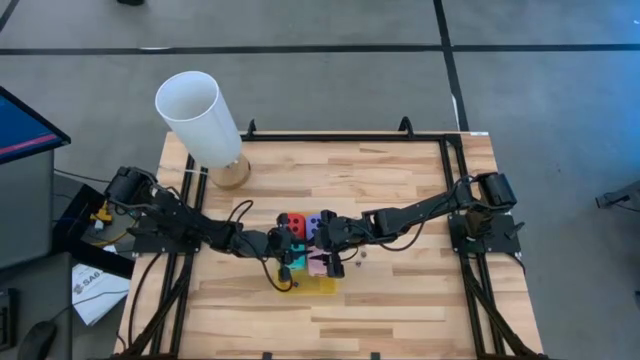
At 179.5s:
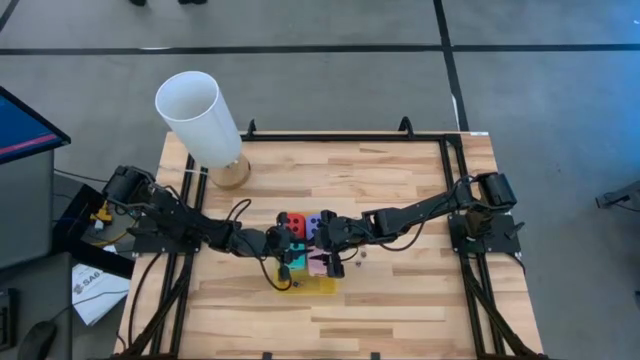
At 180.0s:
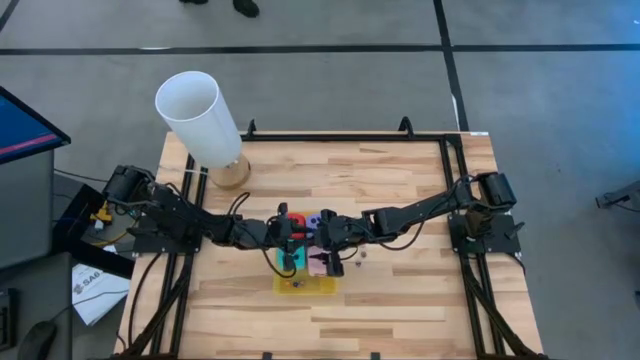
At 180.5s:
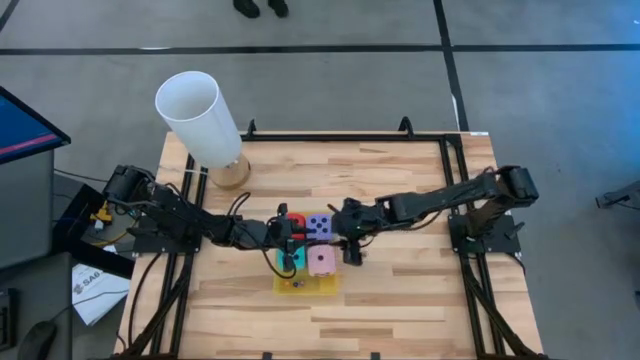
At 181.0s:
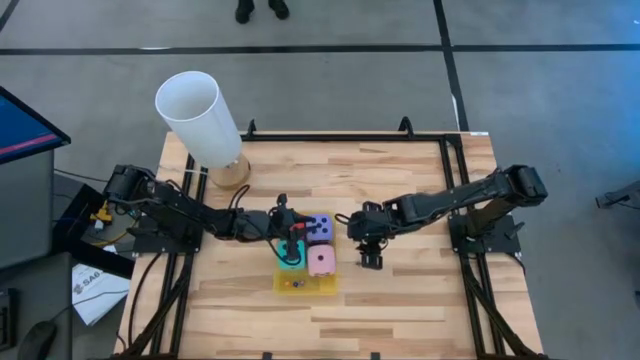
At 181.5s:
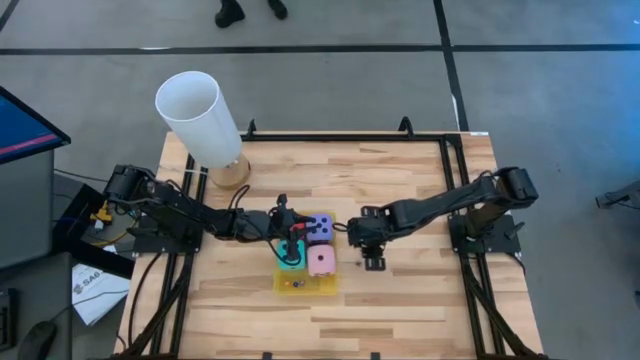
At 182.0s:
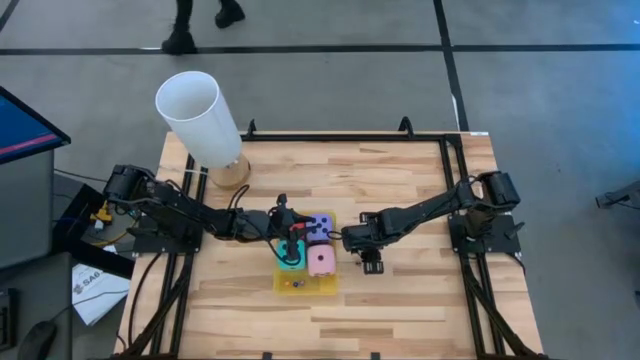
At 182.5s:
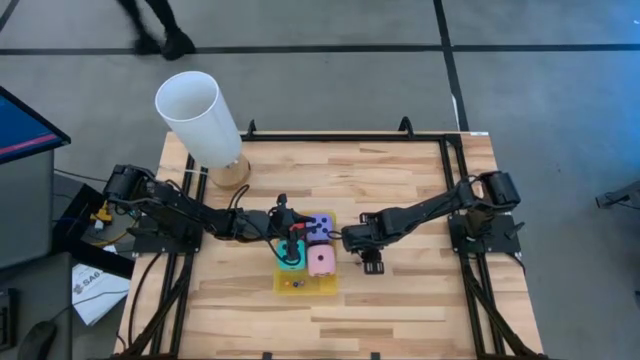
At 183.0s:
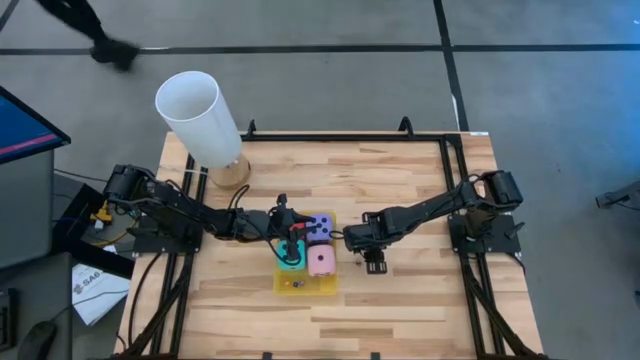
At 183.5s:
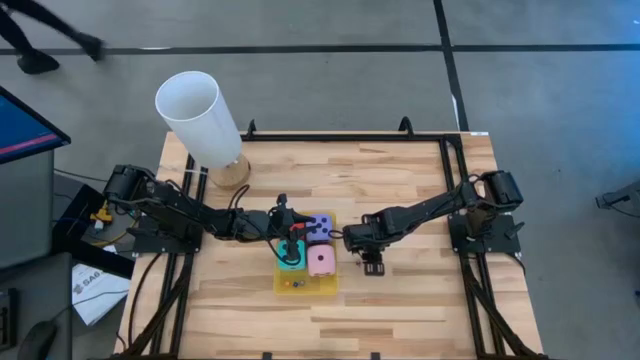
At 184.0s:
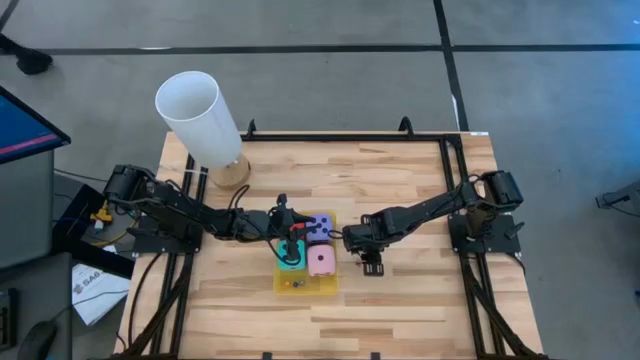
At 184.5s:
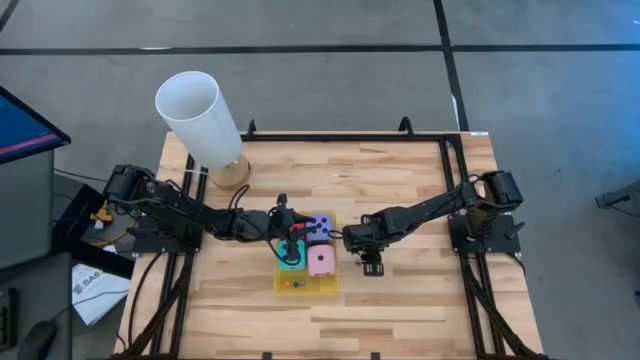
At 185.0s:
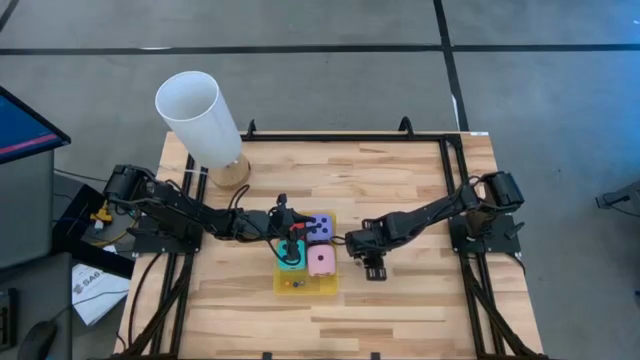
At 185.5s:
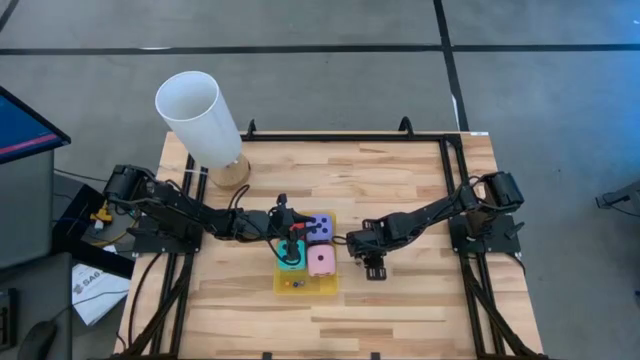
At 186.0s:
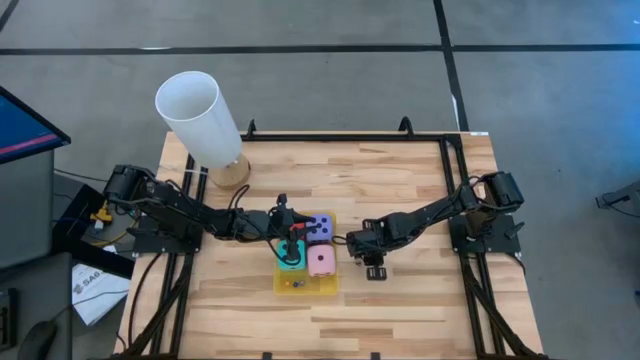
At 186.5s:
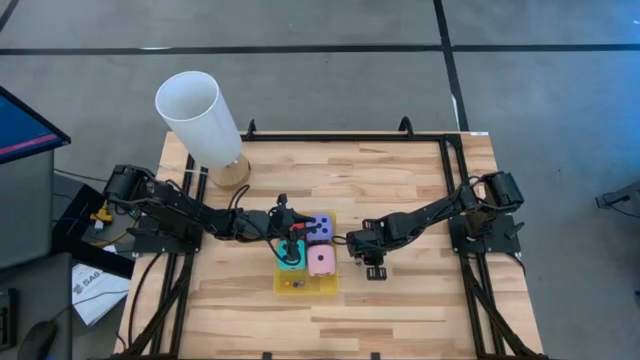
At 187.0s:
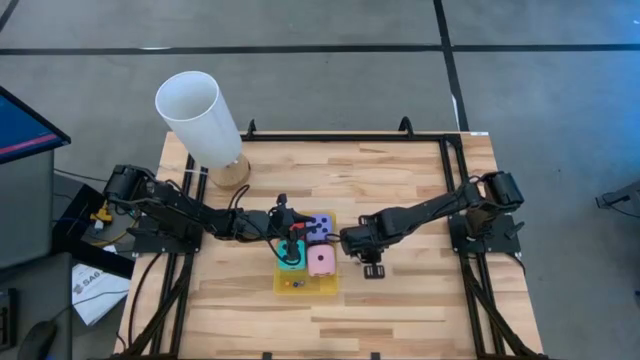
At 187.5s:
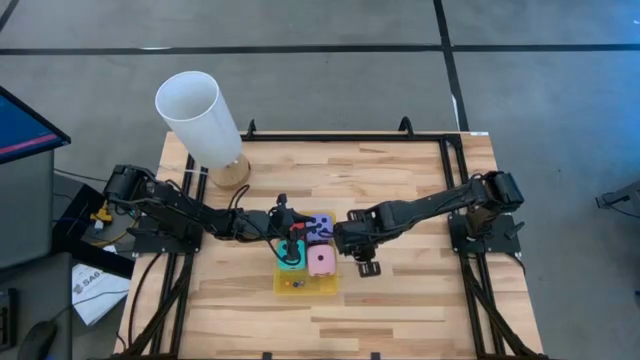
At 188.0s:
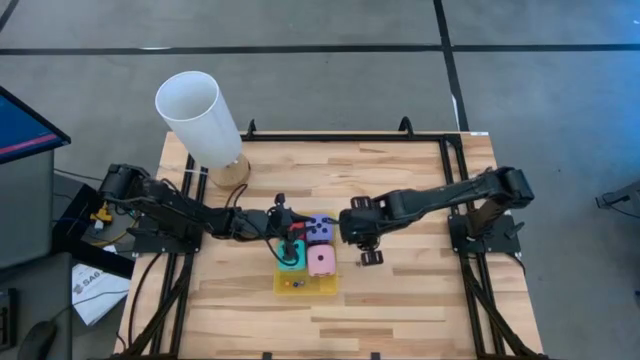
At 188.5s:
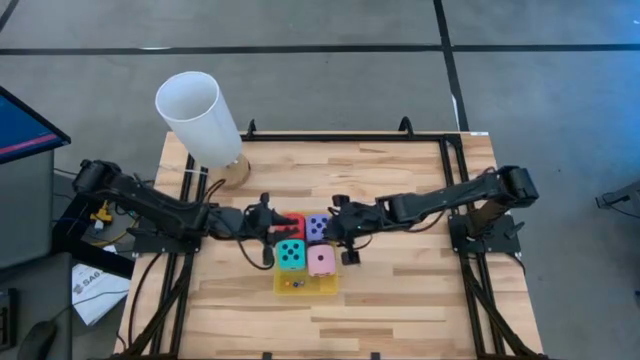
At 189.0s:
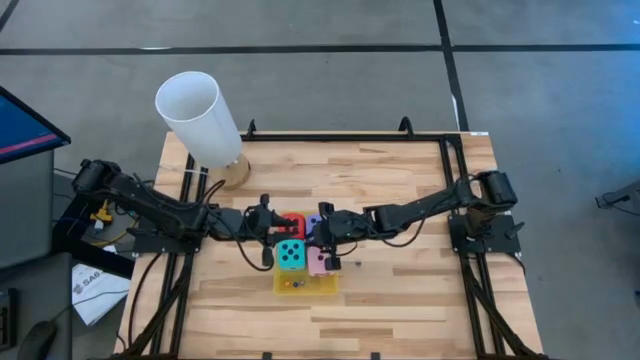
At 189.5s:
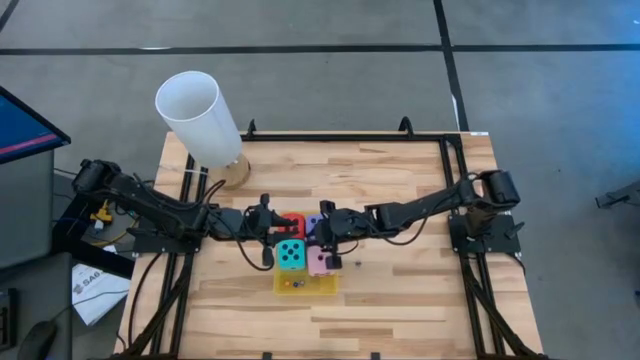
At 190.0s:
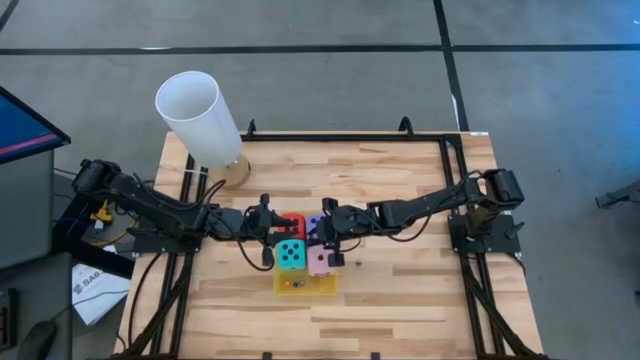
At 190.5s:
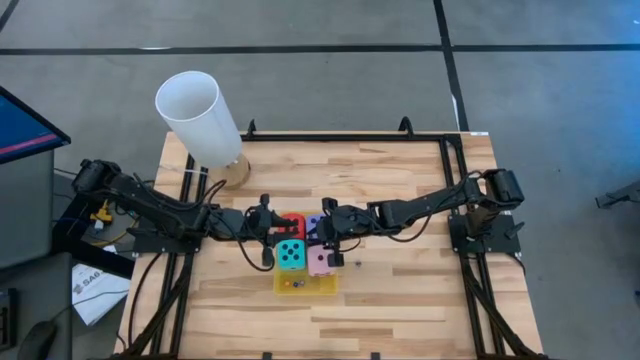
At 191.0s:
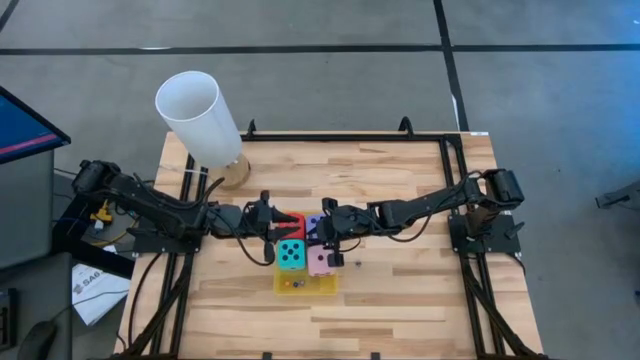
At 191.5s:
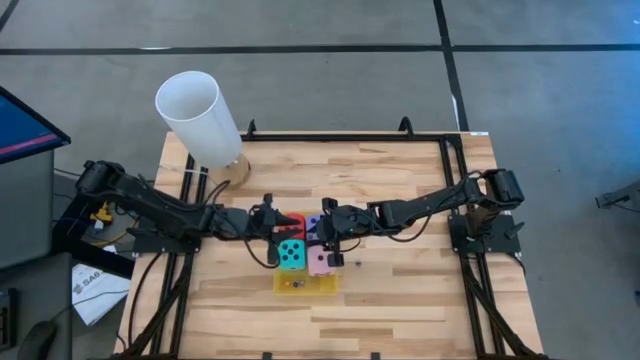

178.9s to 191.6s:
Task: Pick & Place Dice
Put the black die into the yellow bin

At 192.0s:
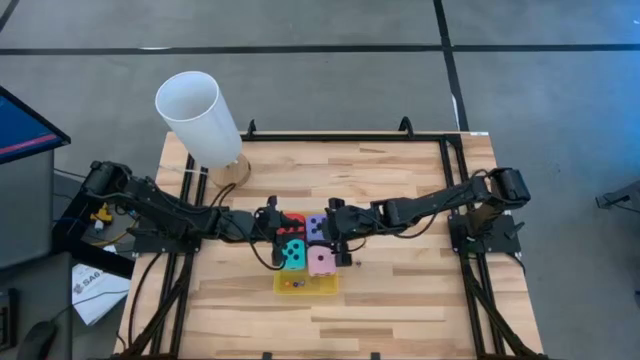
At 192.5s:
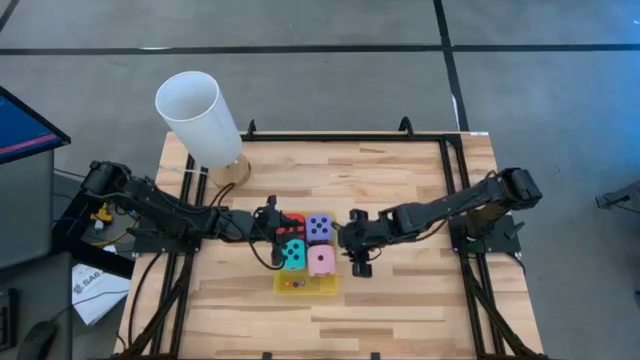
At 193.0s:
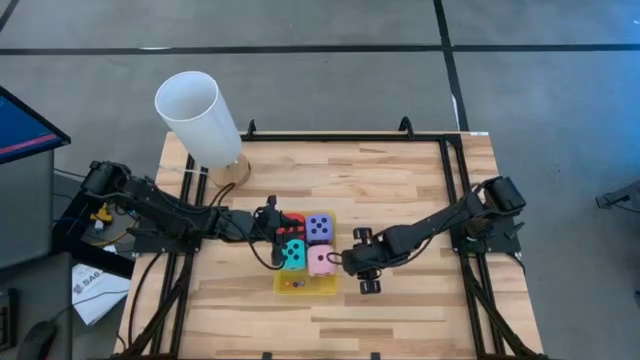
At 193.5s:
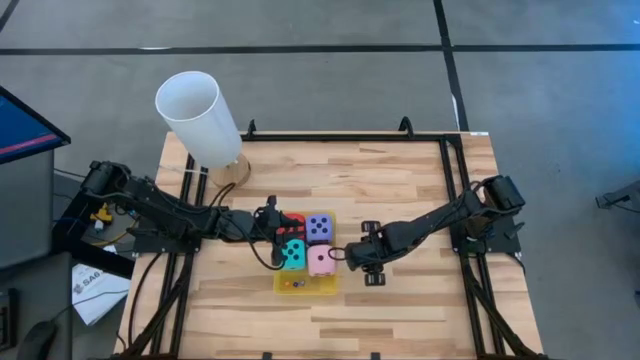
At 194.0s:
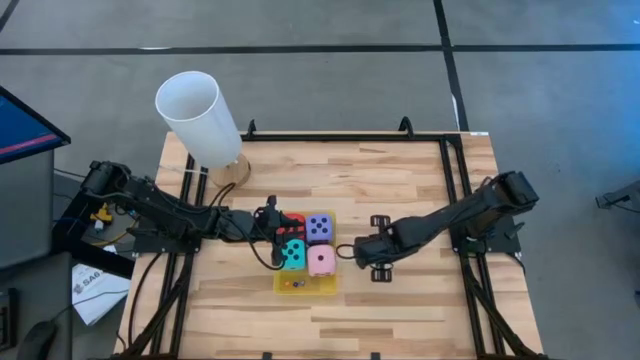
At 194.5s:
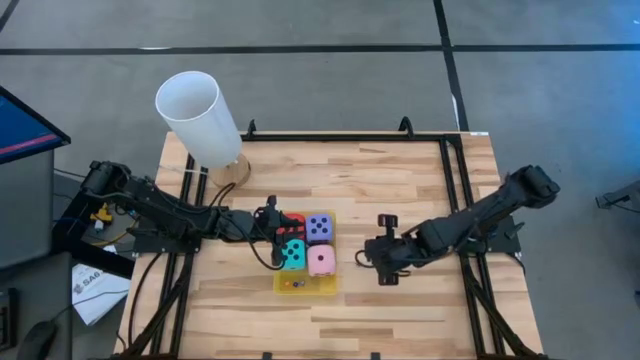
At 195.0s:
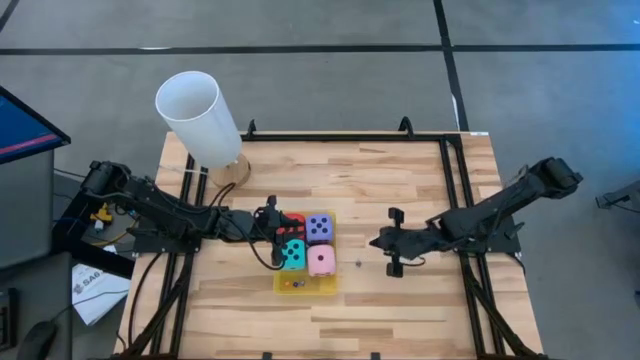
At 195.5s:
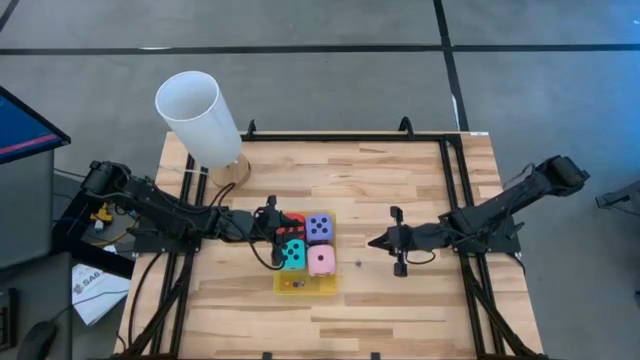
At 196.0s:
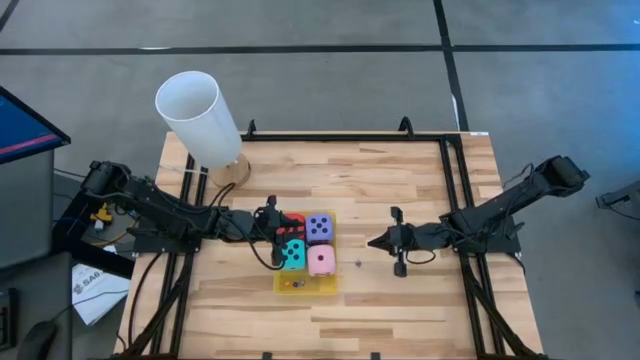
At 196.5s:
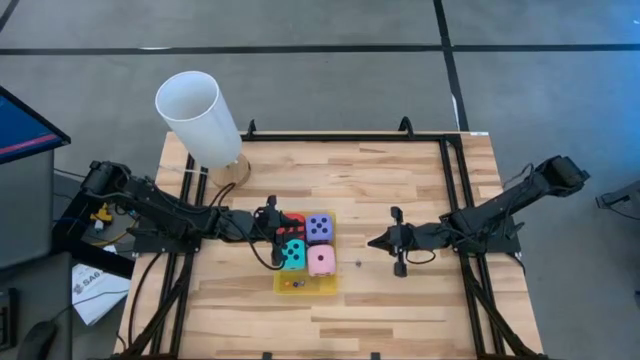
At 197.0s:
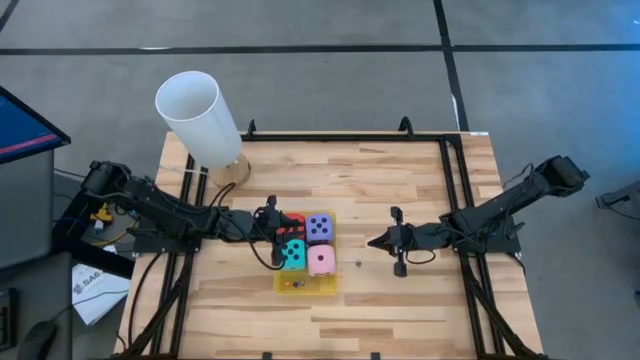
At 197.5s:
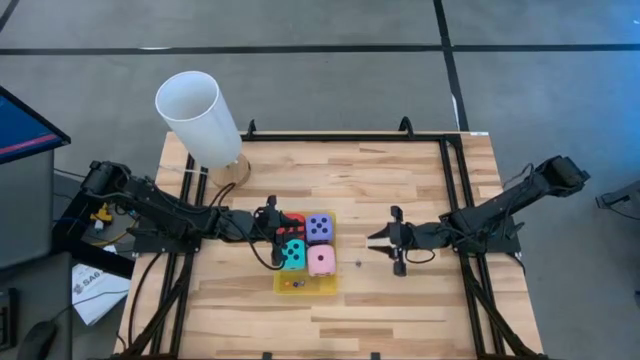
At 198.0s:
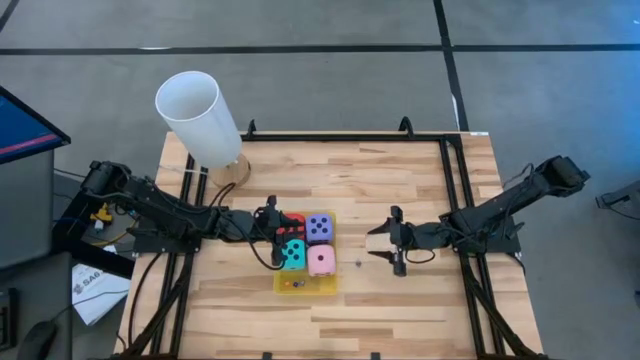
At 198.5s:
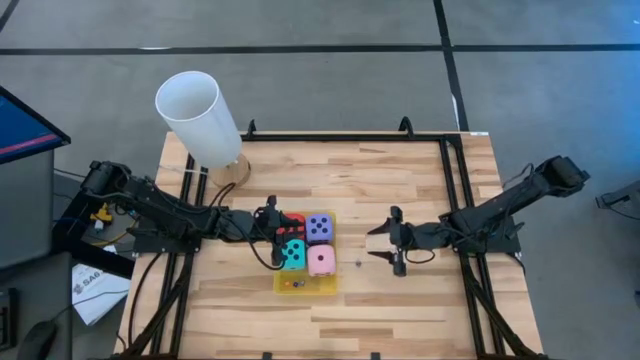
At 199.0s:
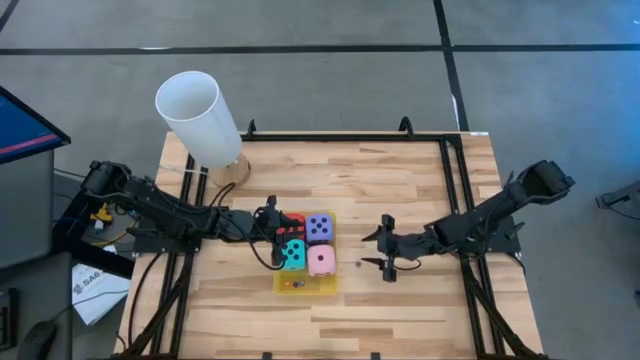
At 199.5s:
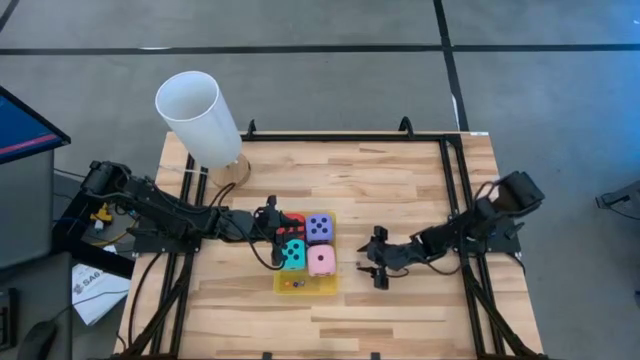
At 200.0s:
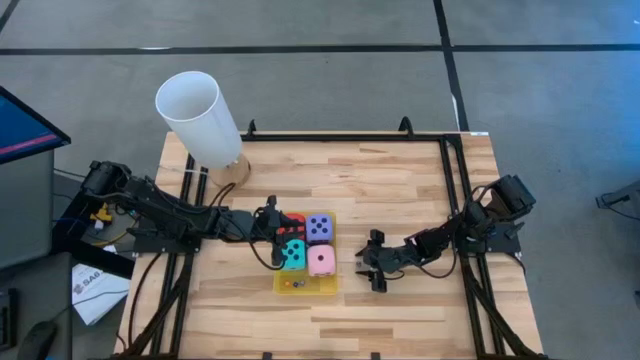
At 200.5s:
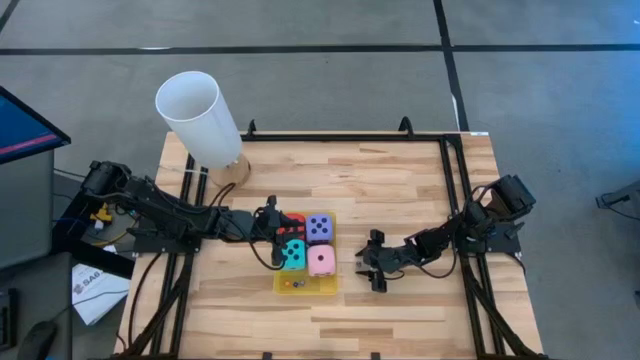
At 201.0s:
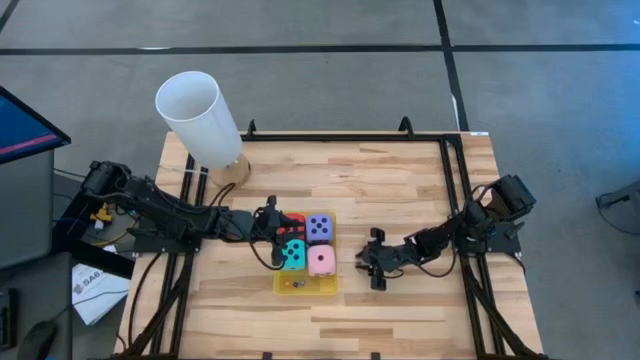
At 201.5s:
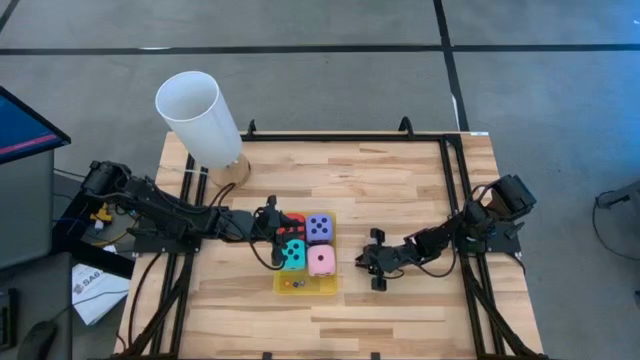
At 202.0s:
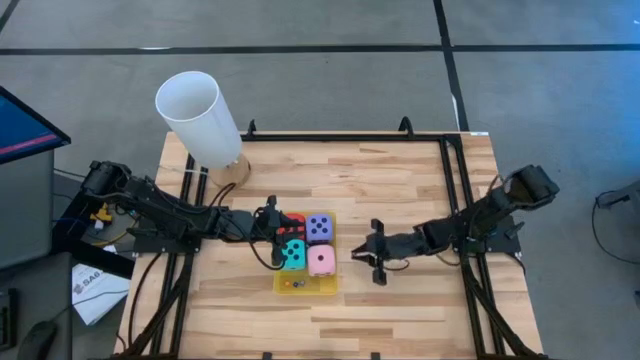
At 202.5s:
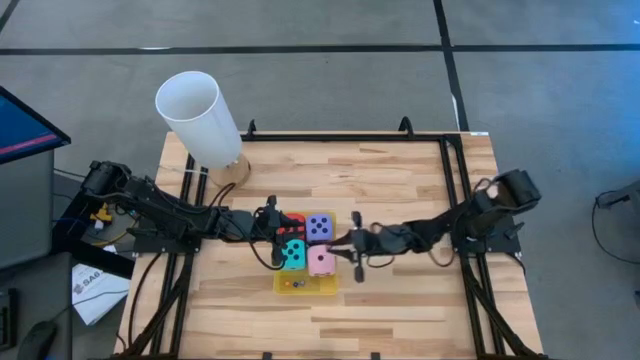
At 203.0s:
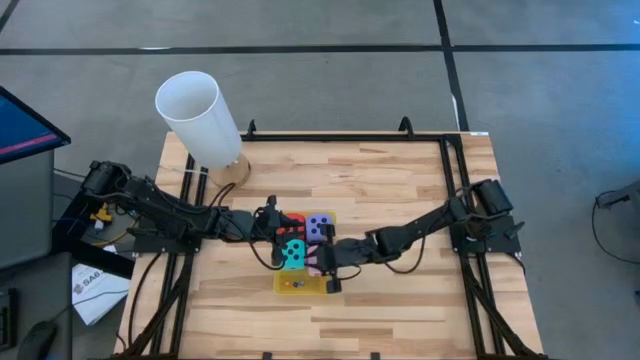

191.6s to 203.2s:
Put the violet die into the yellow bin
